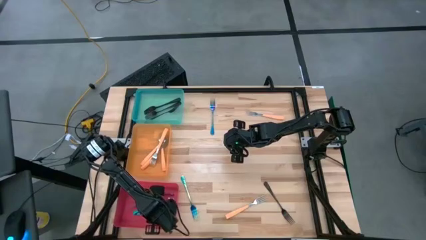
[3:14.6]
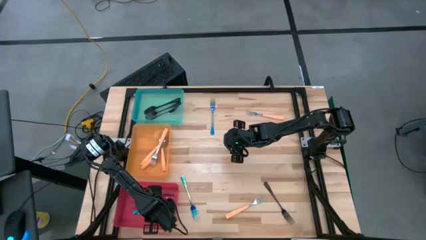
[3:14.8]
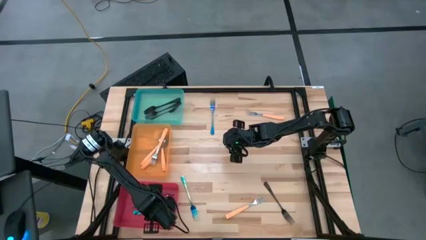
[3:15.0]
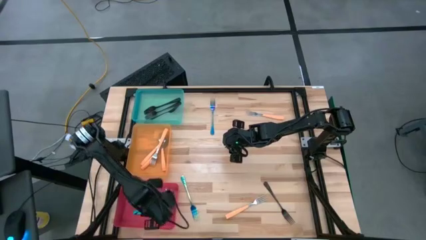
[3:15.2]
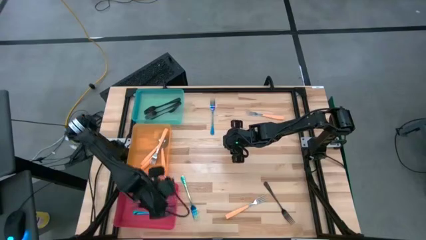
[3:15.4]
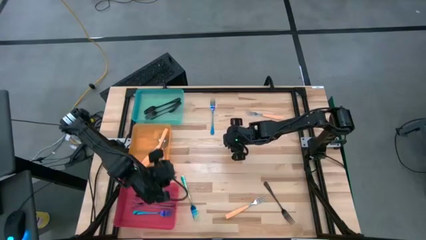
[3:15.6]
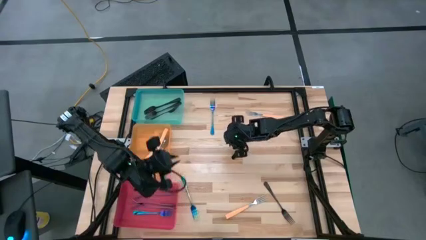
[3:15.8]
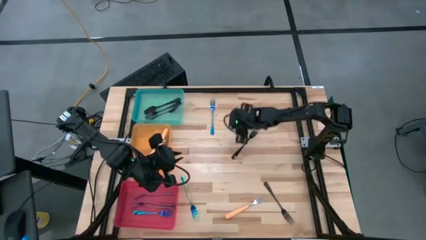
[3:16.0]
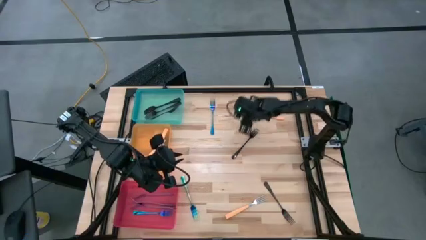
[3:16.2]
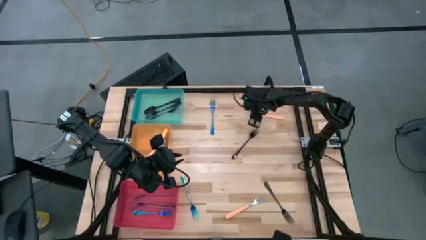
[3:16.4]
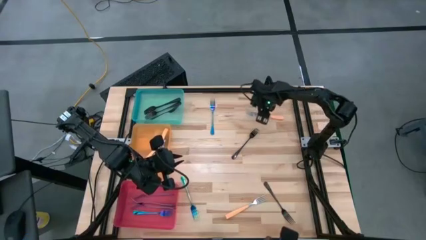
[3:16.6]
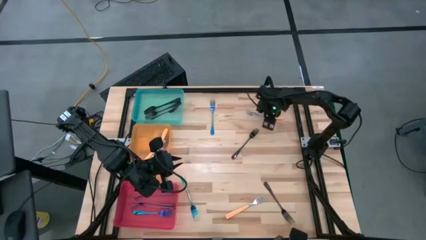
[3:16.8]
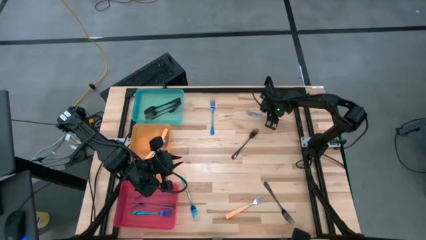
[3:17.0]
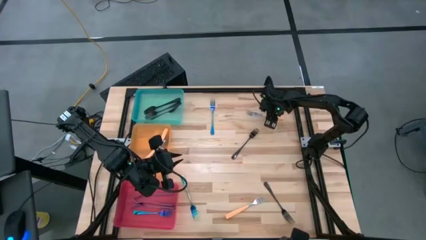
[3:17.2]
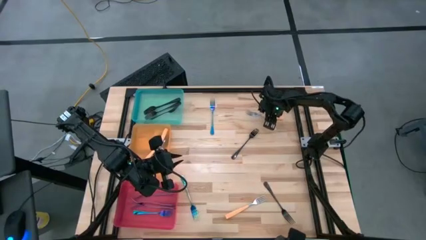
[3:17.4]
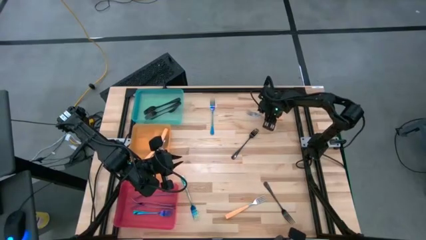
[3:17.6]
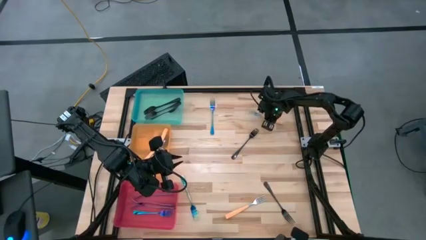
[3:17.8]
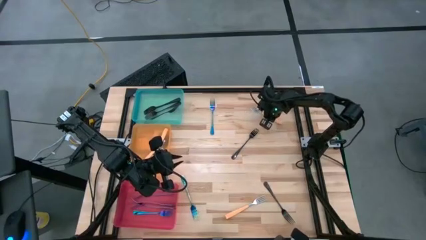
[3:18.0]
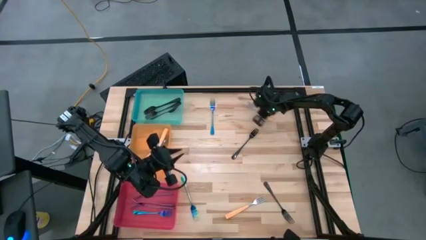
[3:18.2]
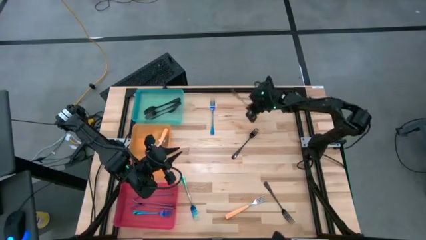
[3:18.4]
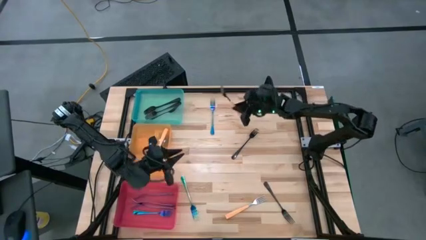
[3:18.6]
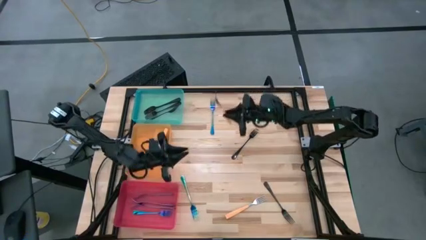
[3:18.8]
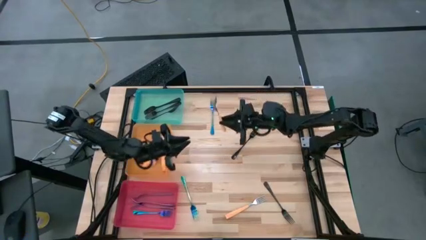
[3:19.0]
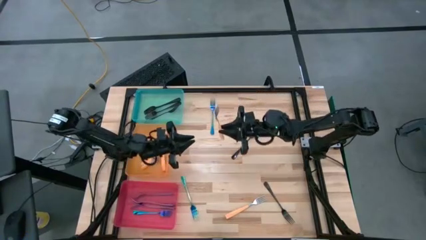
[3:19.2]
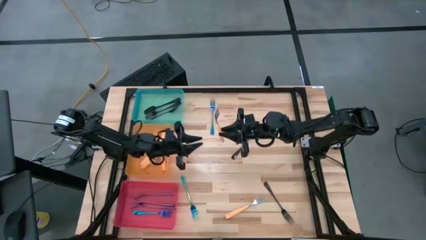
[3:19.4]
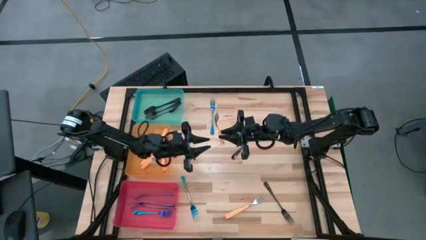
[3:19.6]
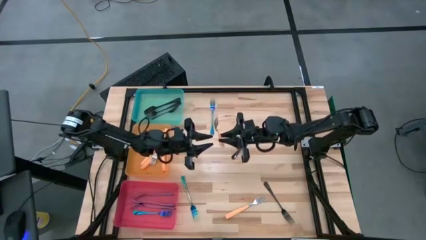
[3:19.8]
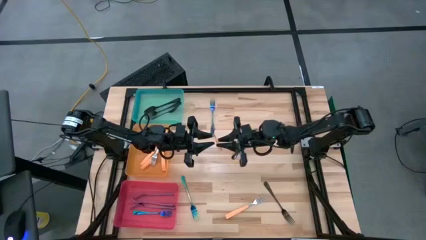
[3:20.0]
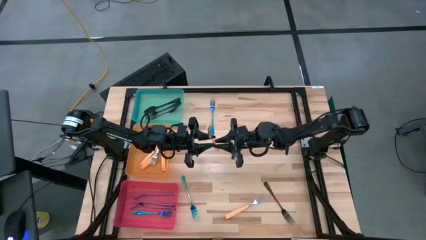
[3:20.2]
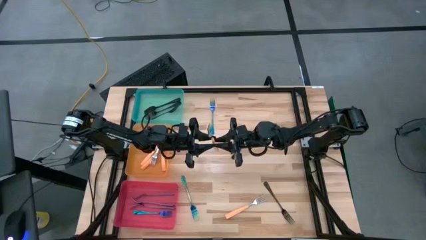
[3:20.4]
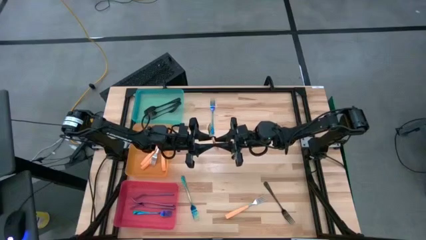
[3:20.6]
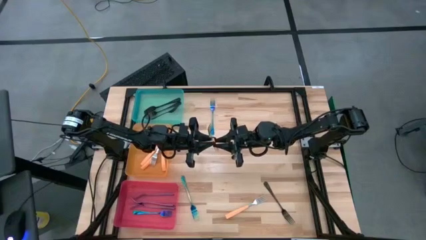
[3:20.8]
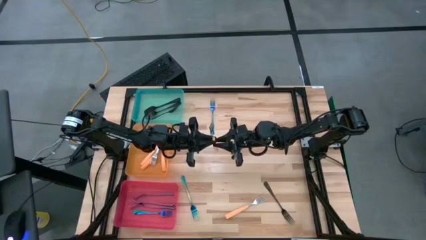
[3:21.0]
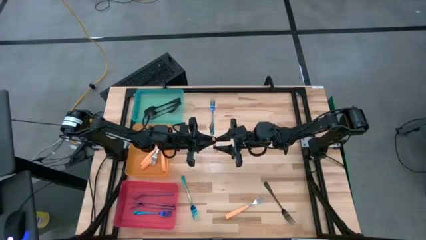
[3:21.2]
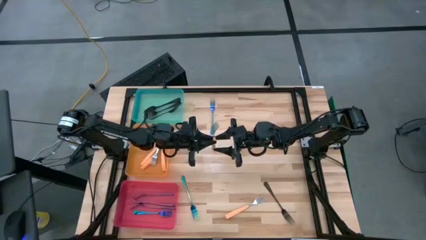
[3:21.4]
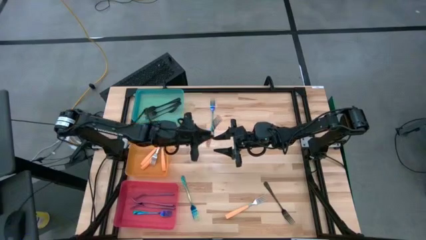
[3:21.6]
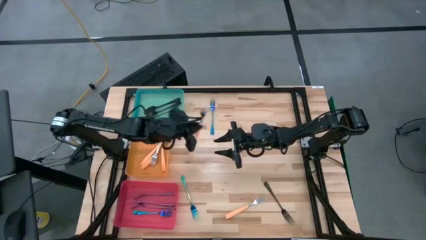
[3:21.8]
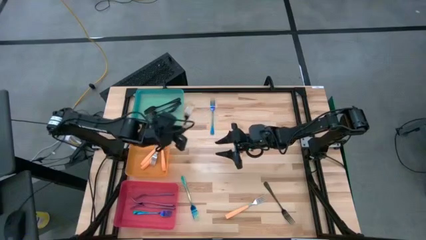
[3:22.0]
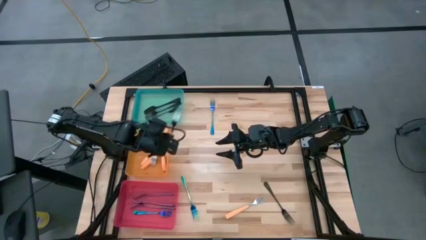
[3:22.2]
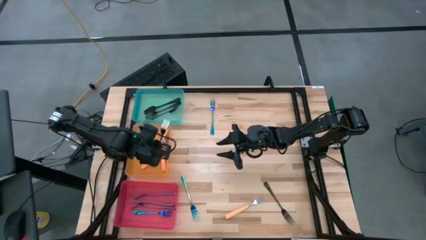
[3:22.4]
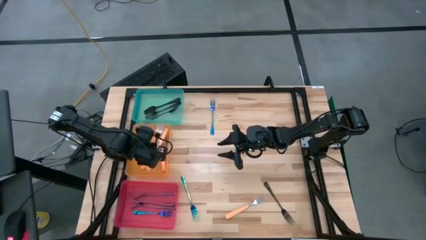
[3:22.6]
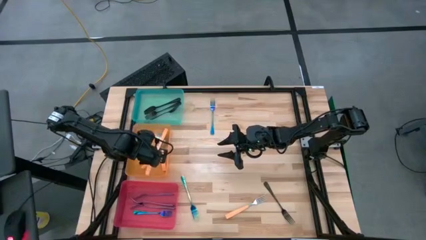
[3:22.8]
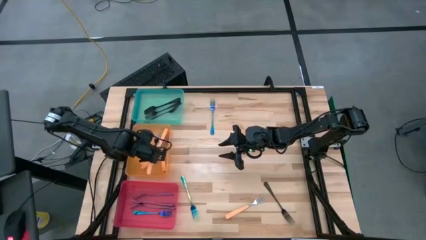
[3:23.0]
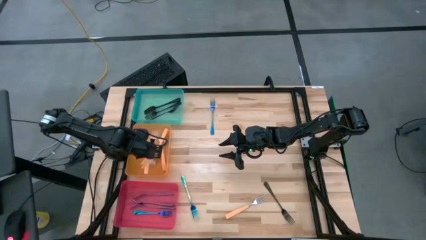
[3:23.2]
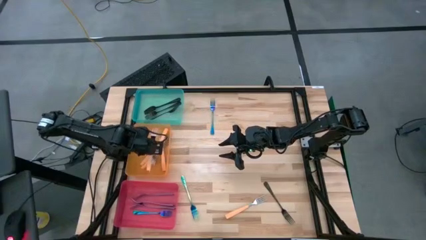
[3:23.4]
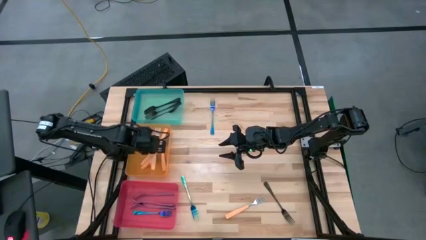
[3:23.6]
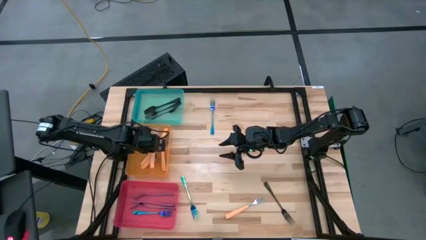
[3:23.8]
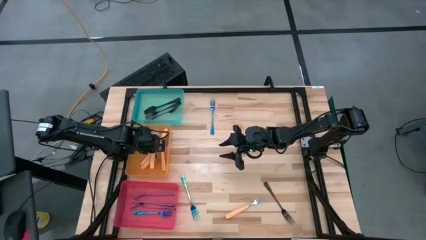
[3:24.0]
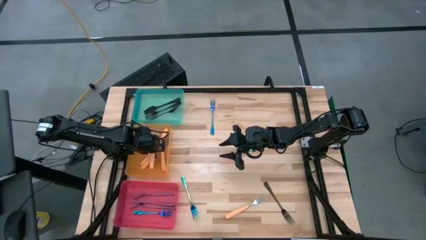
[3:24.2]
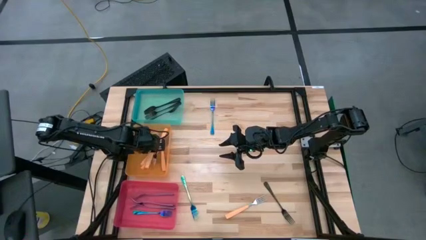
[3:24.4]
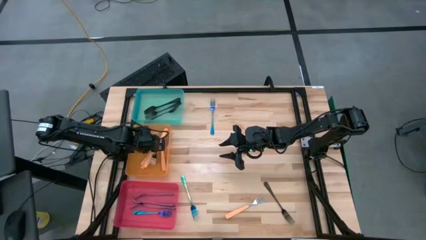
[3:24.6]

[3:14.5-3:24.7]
Task: Sort silverware by color (type)
Put the orange fork into the orange bin
